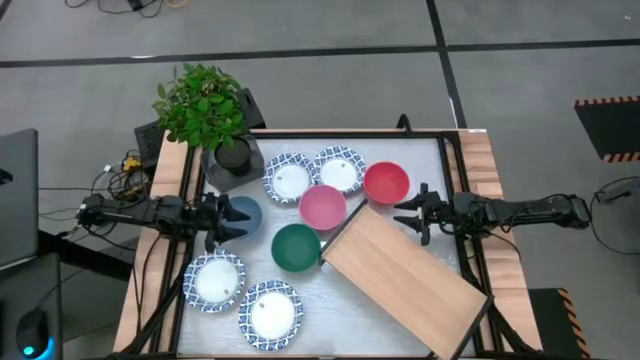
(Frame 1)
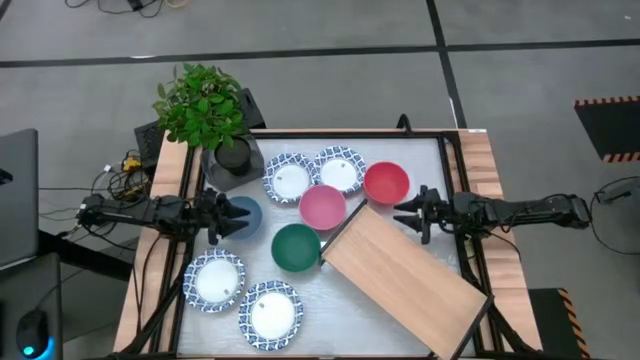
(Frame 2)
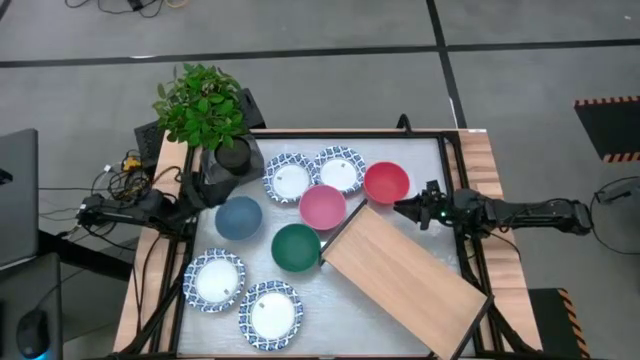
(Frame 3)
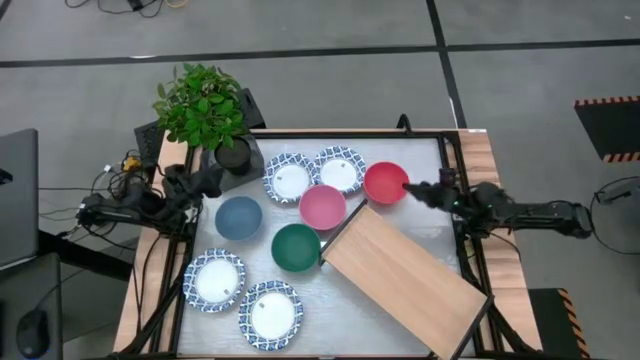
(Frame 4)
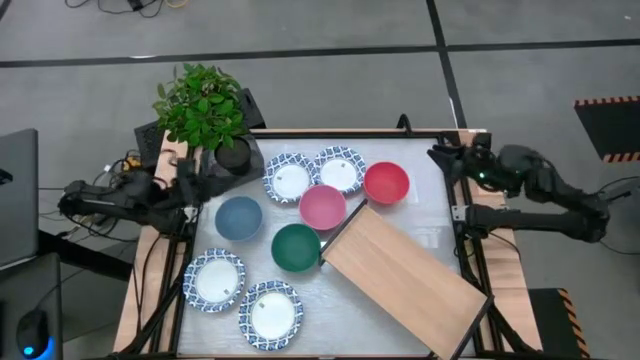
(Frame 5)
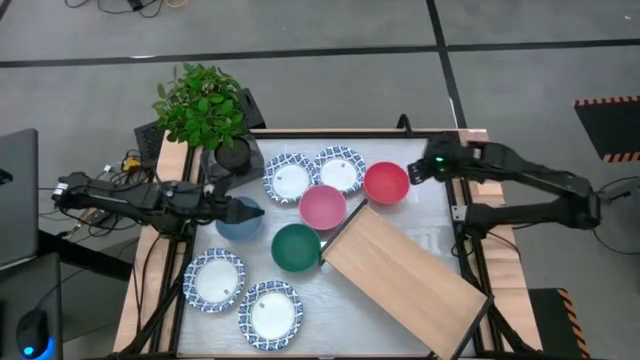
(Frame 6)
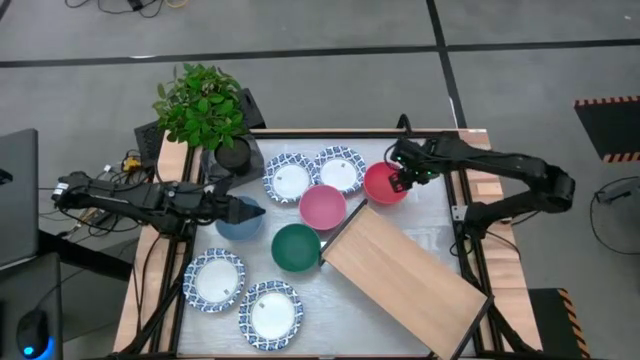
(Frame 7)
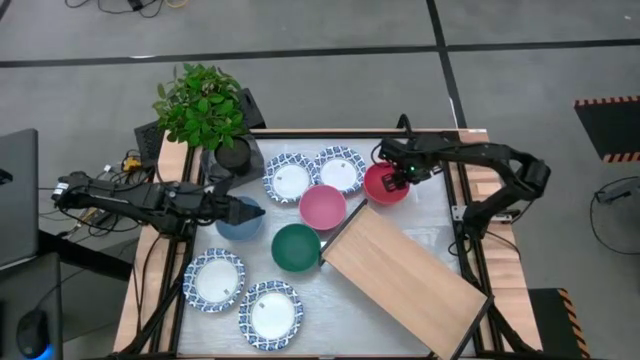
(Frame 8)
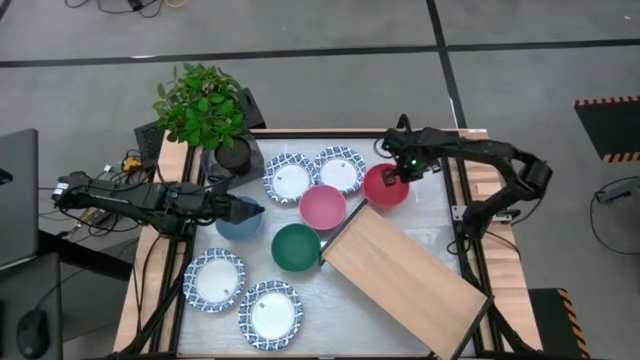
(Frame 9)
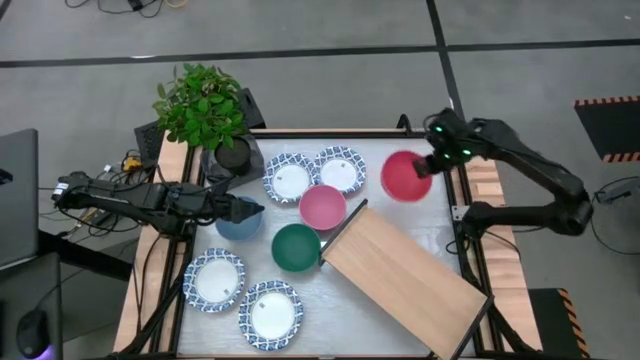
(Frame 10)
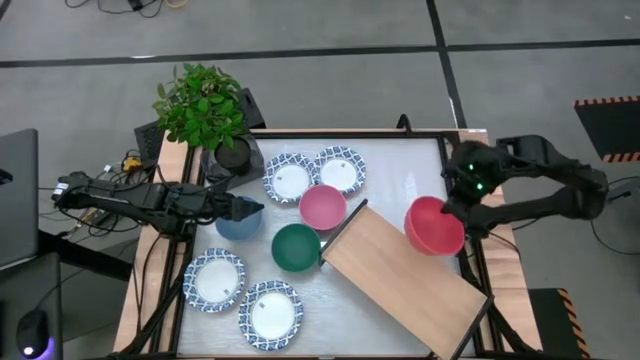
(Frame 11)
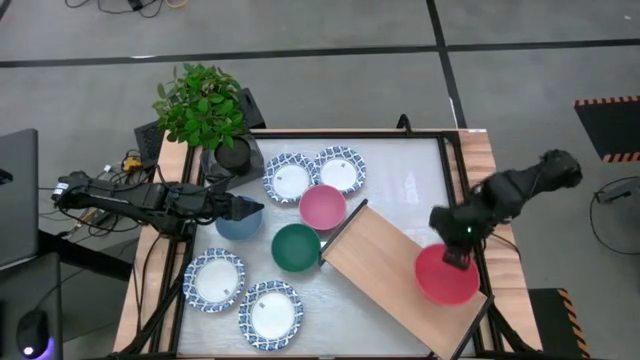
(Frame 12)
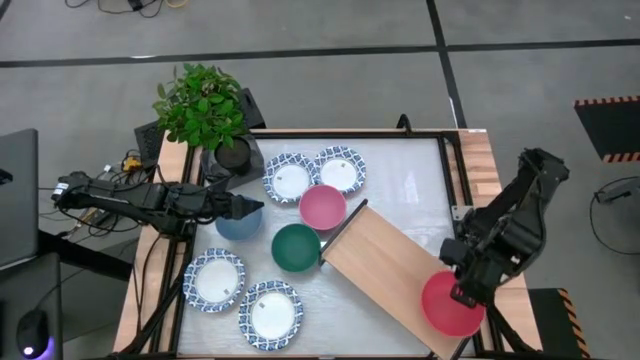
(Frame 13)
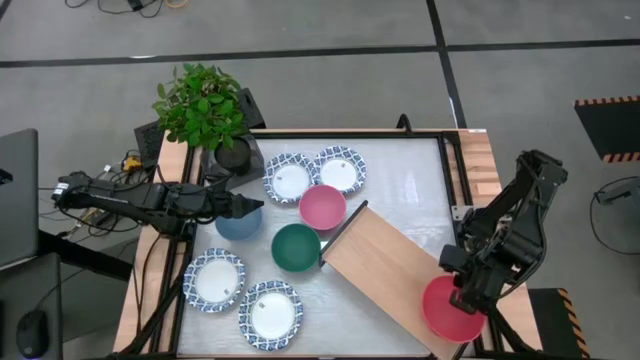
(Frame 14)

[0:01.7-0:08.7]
Task: Place and stack bowls onto a shelf
Put the orange bowl on the shelf

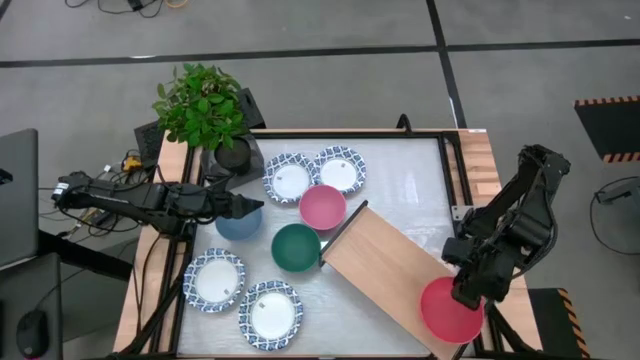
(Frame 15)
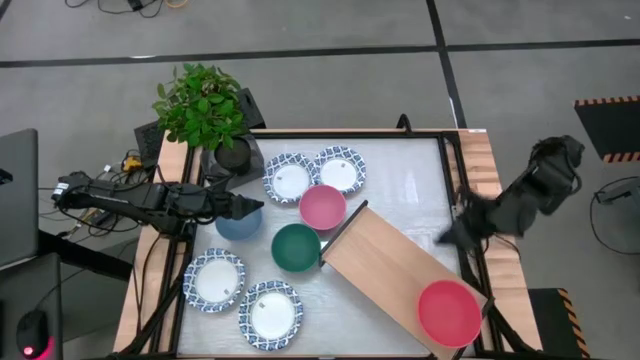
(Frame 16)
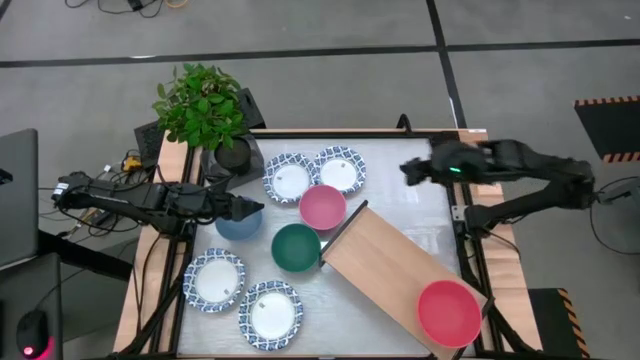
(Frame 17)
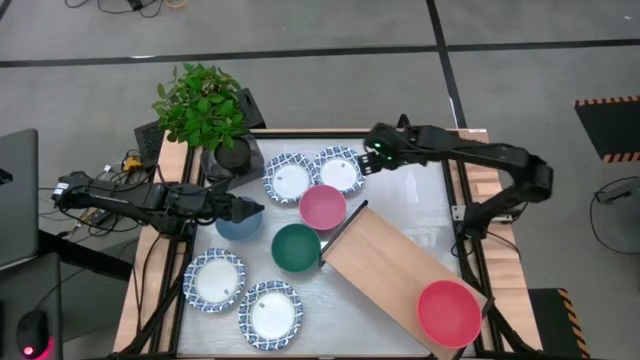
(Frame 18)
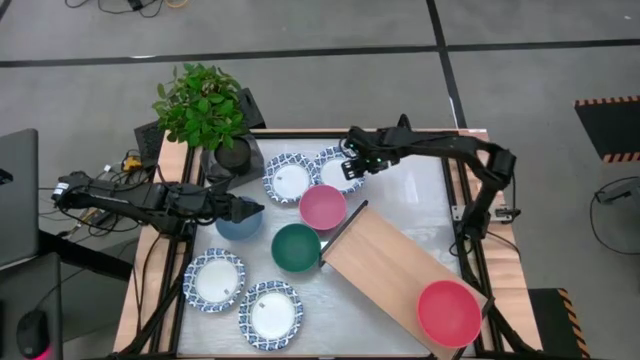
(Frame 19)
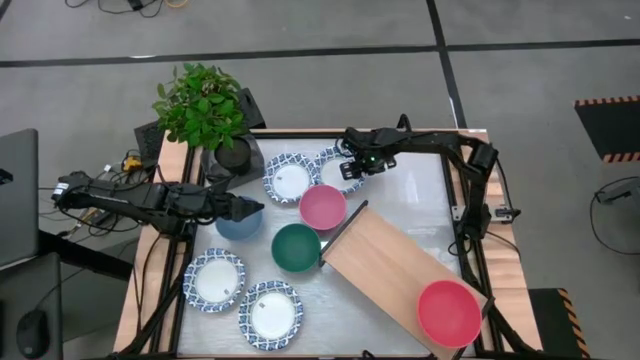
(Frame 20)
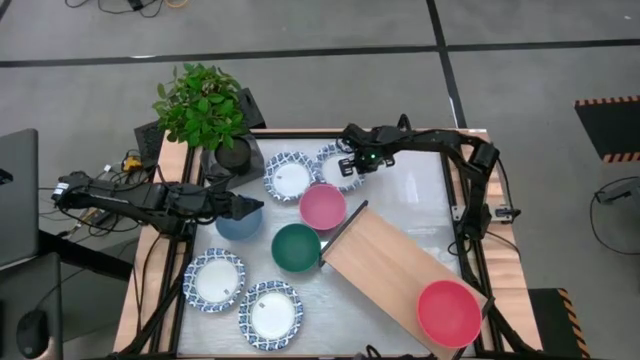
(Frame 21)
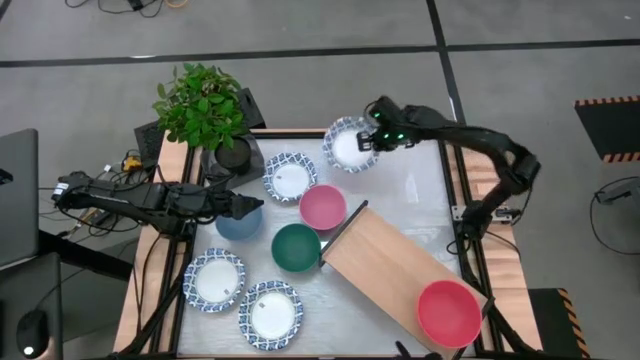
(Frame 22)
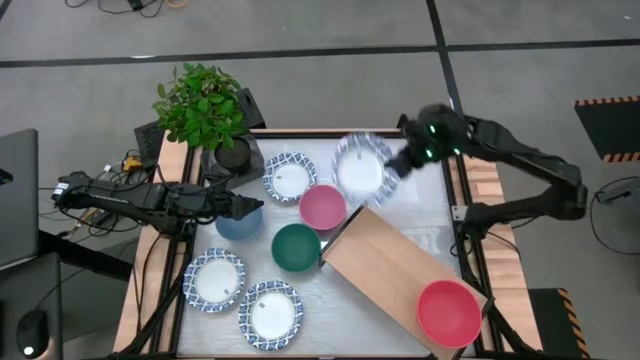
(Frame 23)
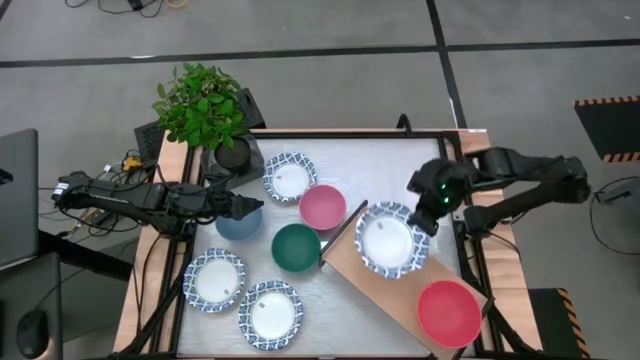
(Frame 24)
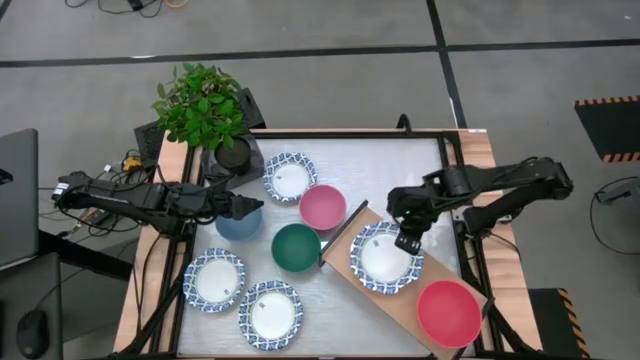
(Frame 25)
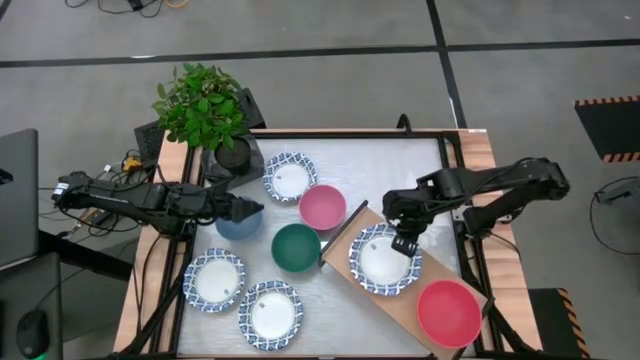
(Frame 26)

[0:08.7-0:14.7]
Put the white patterned bowl on the shelf

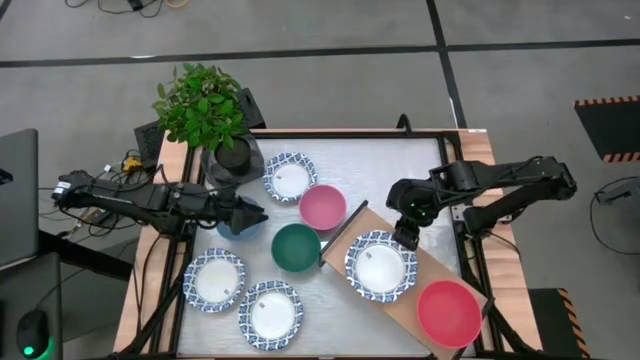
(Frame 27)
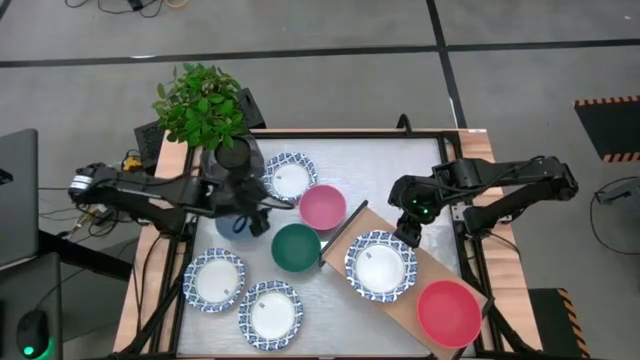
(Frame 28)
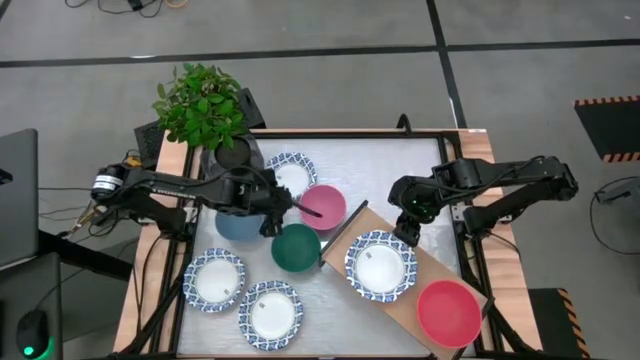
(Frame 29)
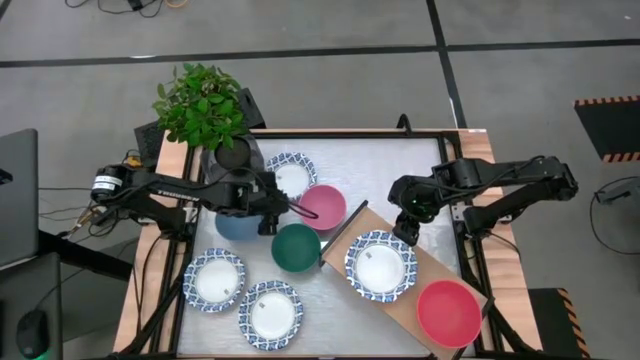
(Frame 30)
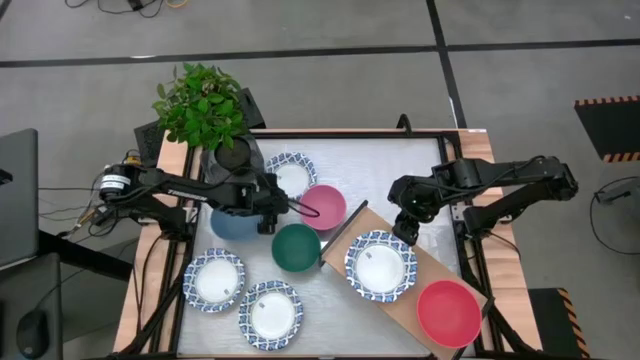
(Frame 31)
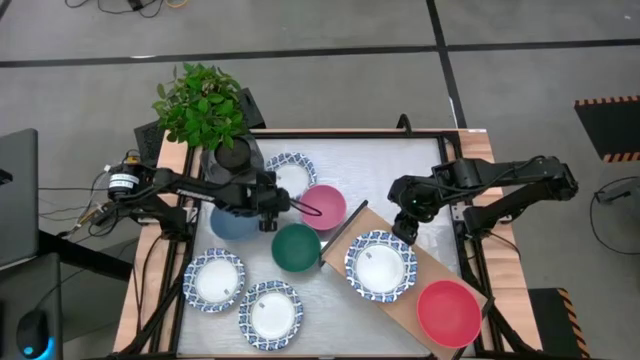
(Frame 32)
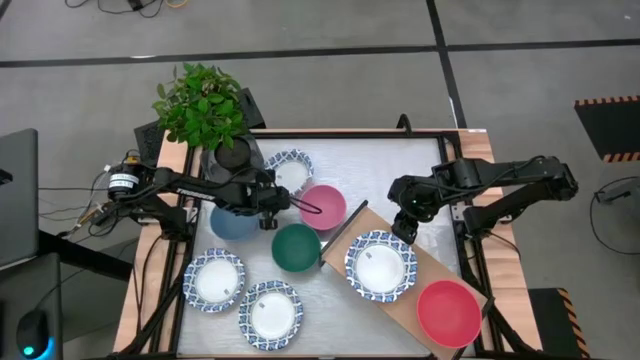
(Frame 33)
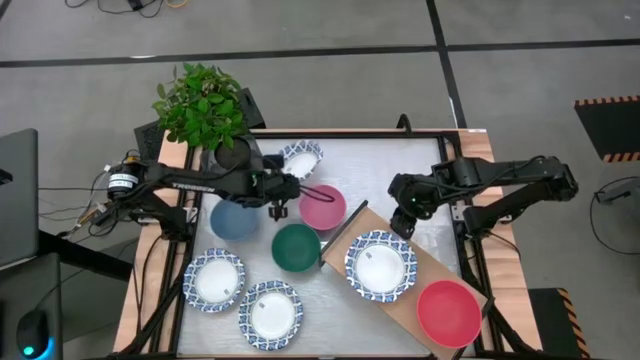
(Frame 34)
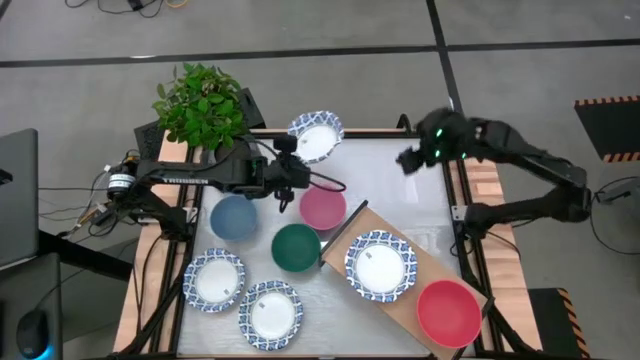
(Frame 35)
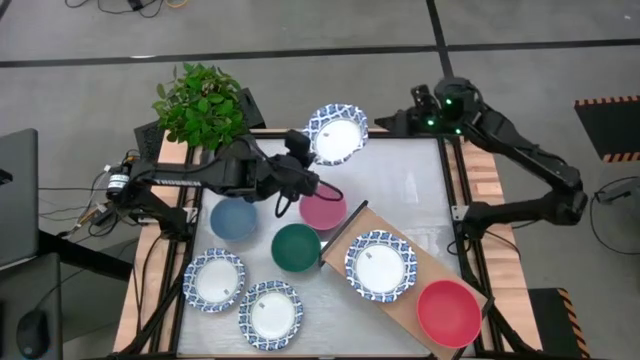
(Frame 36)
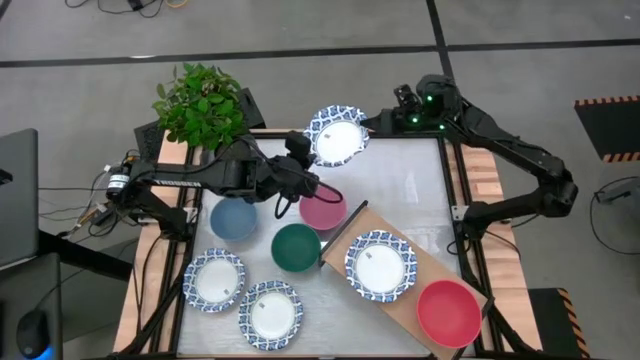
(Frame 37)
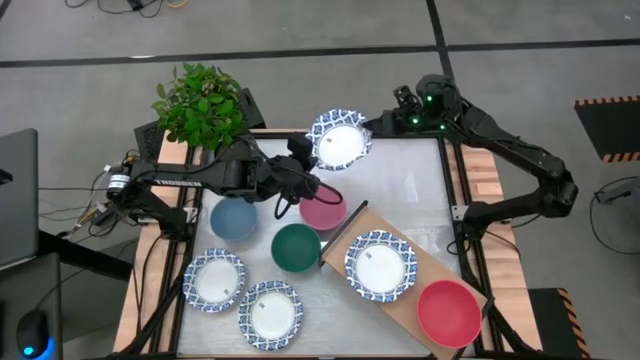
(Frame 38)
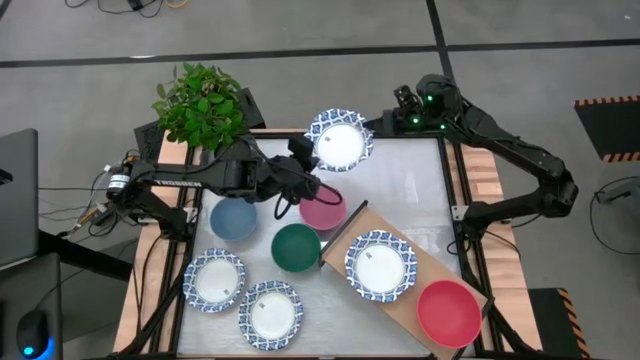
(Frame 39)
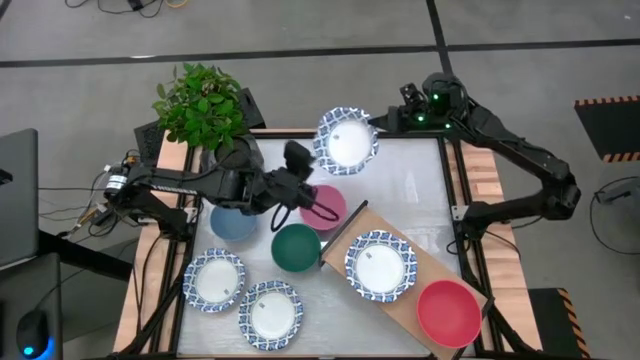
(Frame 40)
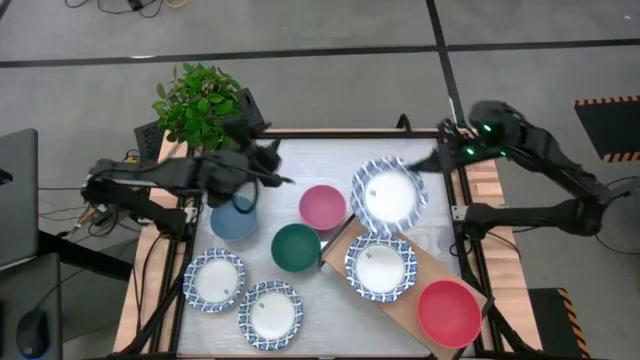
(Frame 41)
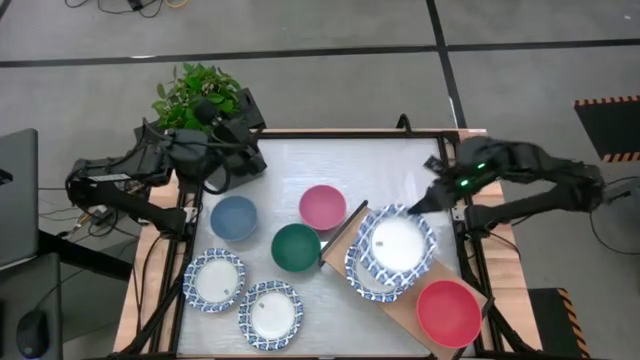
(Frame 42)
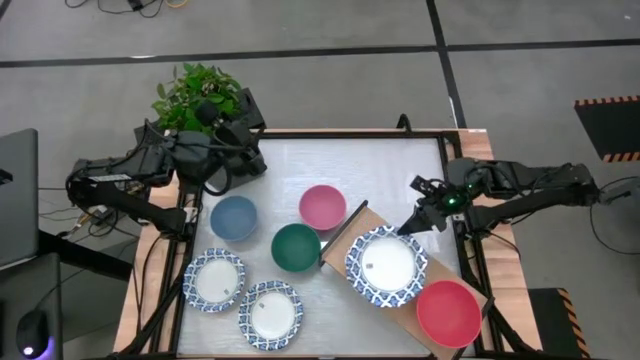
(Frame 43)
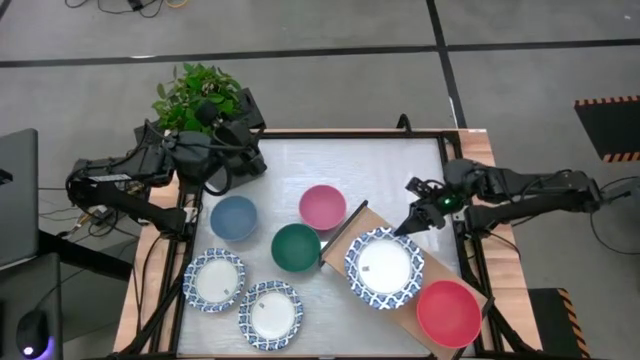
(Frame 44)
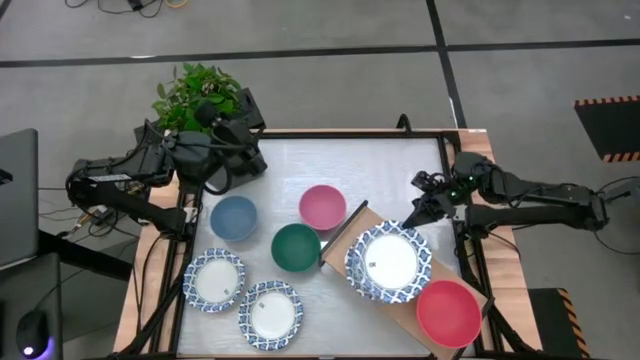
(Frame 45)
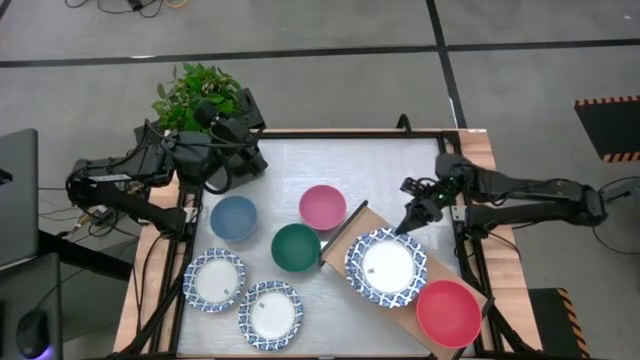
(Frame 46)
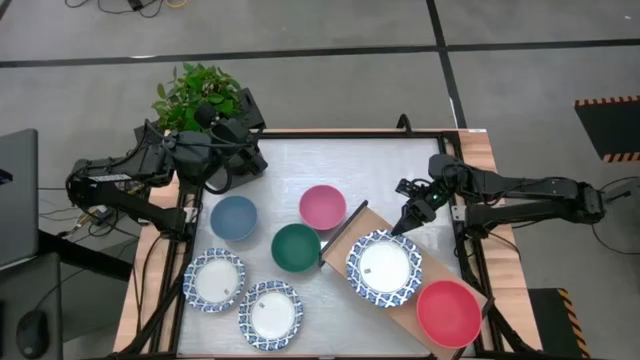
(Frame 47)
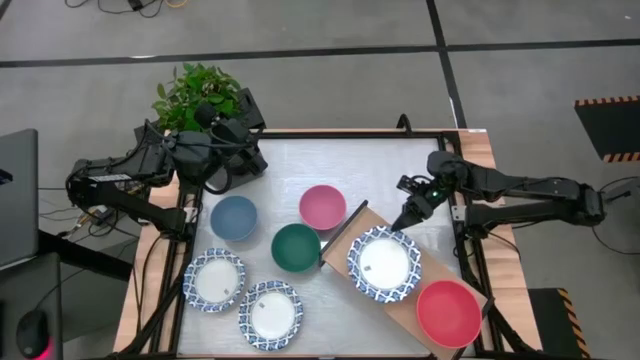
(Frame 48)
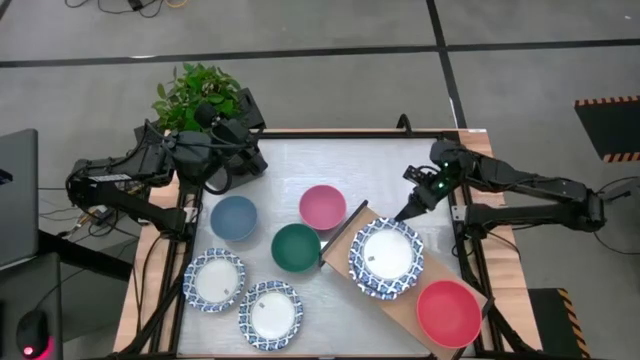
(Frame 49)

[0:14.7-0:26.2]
Stack the white patterned bowl on top of the white patterned bowl on the shelf
